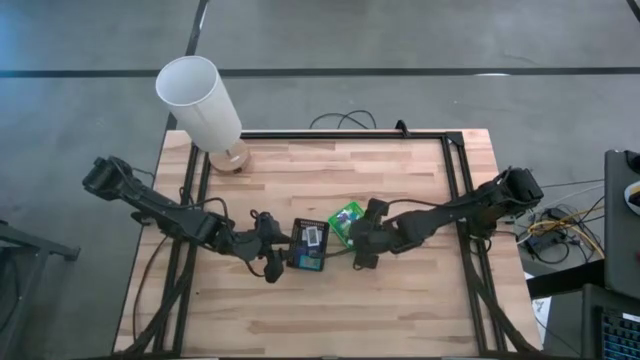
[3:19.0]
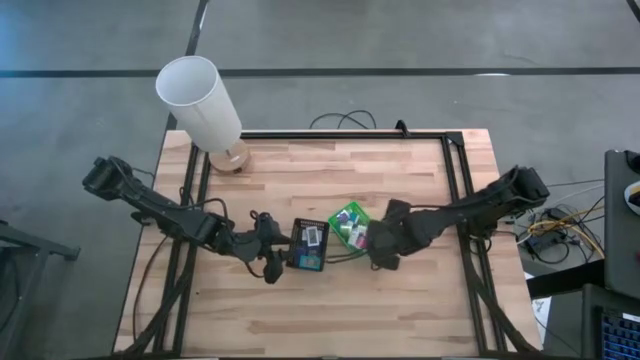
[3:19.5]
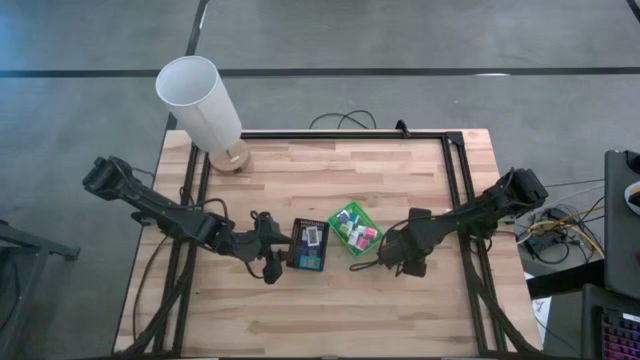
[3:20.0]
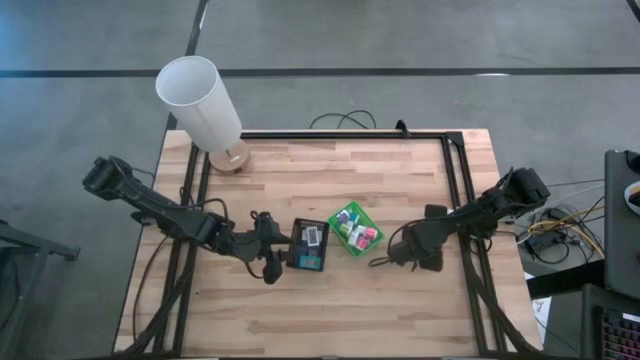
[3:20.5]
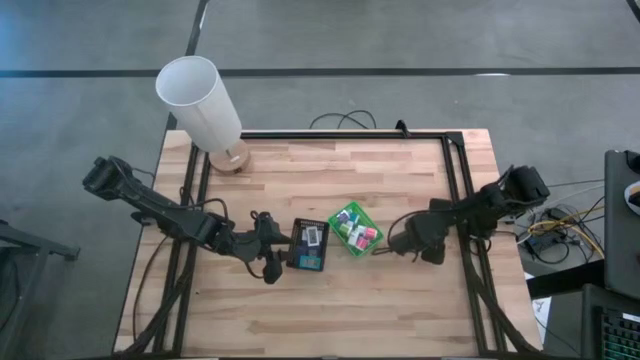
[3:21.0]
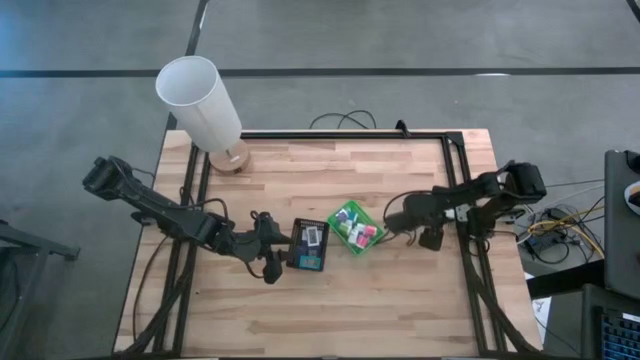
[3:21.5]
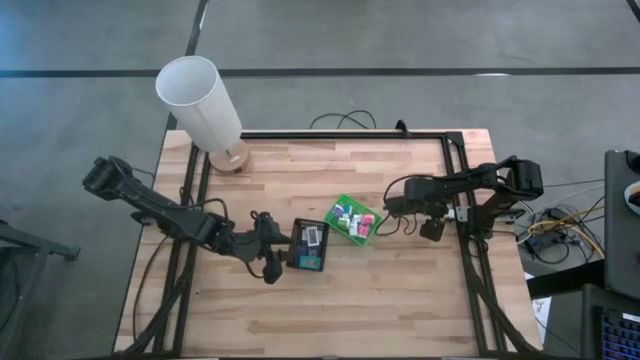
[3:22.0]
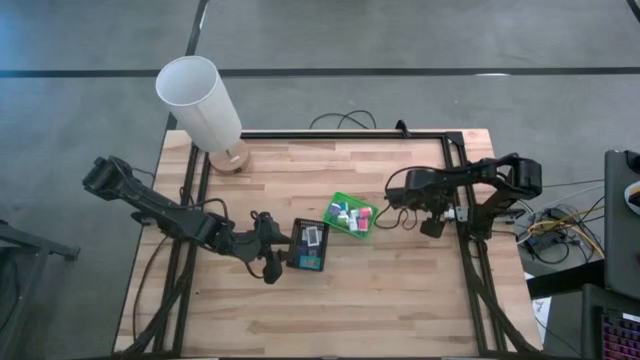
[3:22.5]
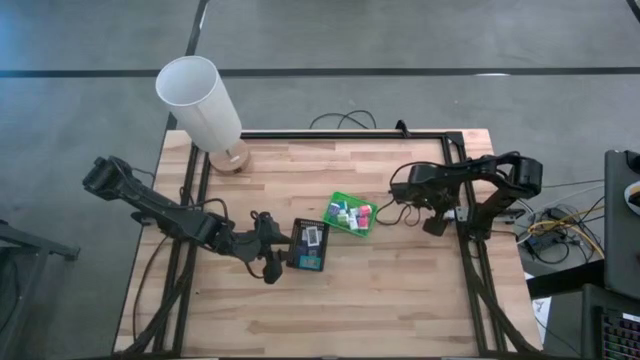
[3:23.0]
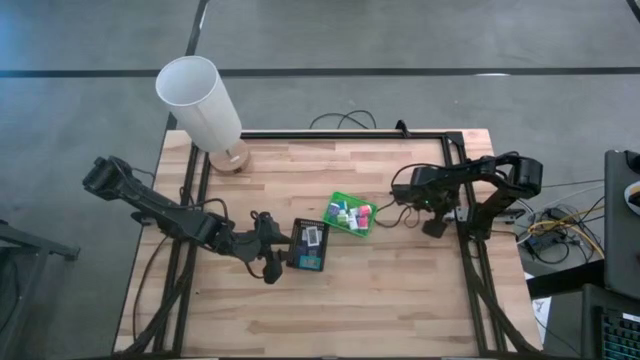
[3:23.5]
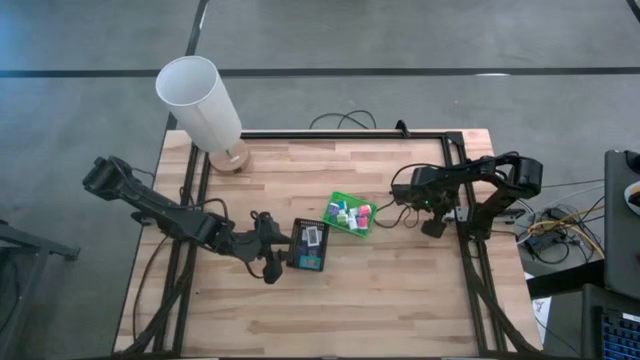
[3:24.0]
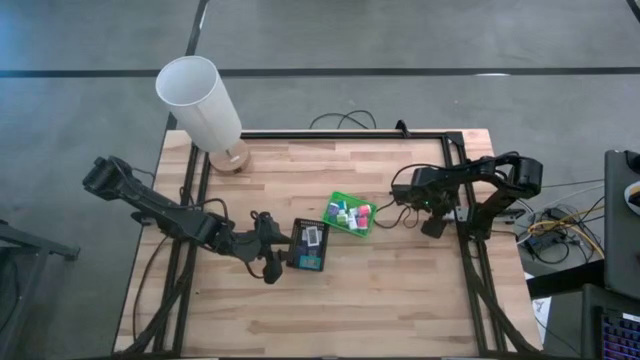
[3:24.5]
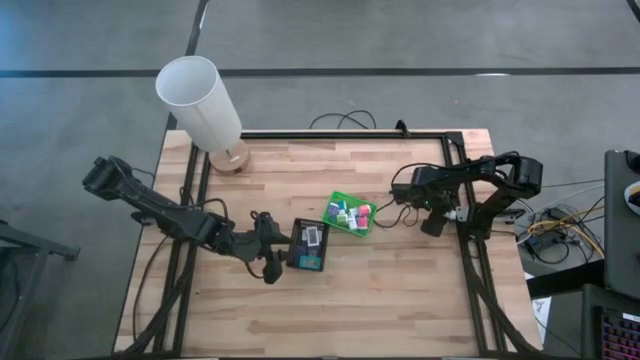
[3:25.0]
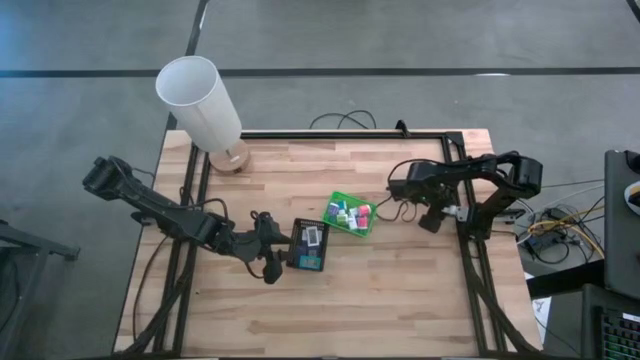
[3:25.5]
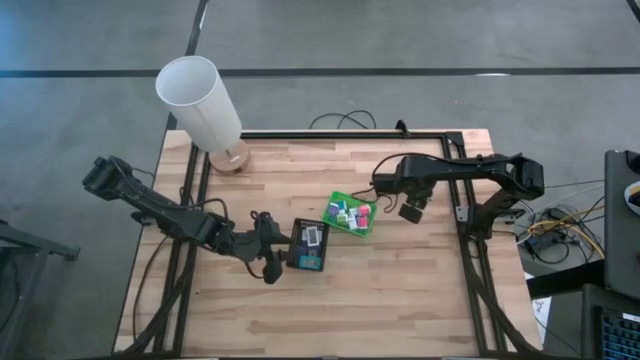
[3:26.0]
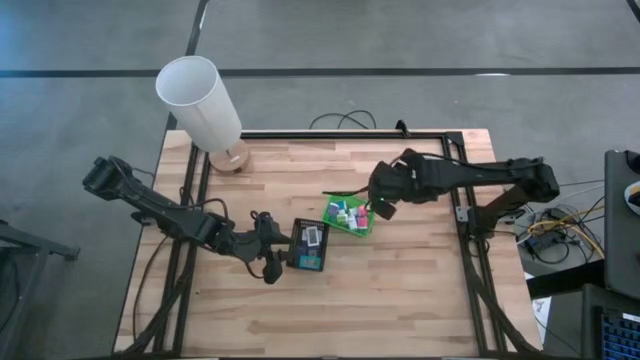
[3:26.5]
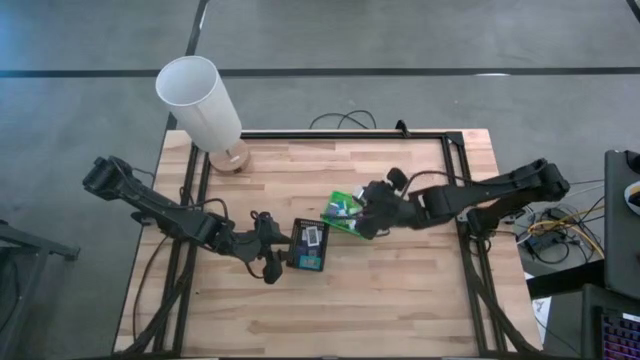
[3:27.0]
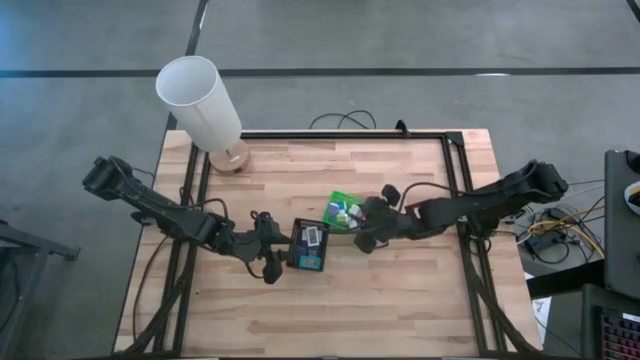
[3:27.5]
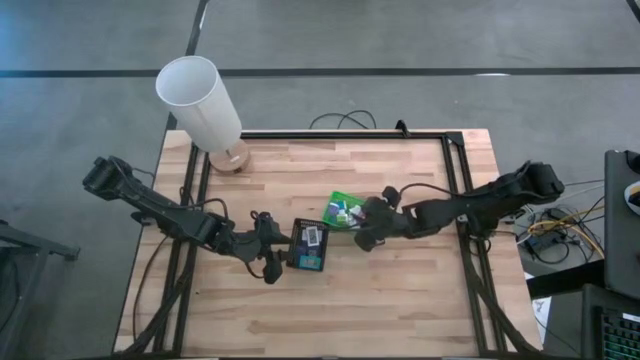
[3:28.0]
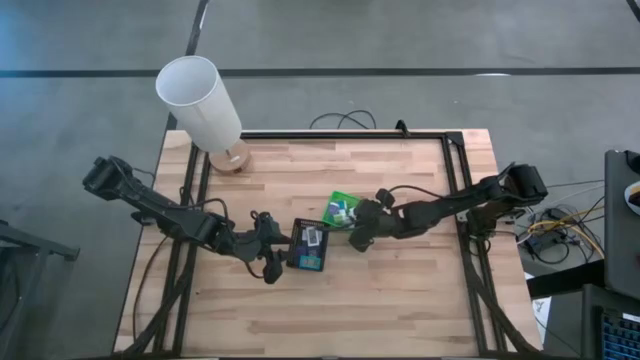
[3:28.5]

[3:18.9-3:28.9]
Task: Pick & Place Office items
Put the white black charger adapter into the green basket

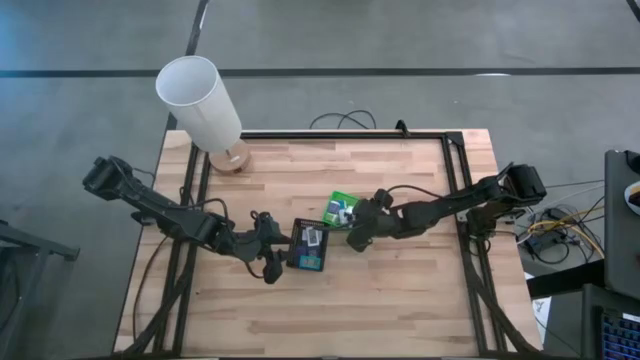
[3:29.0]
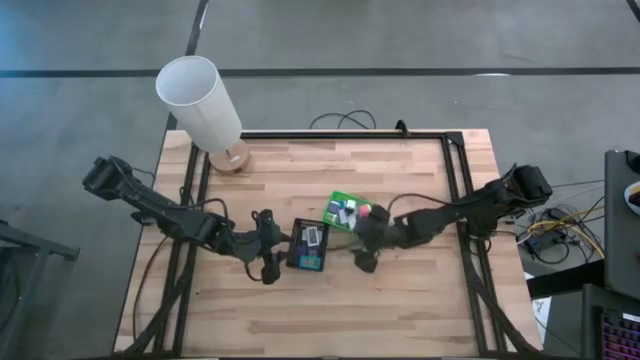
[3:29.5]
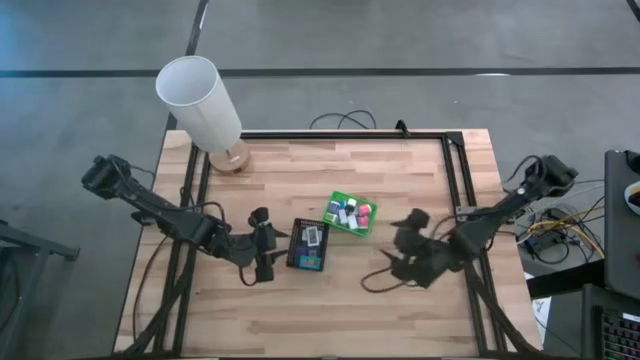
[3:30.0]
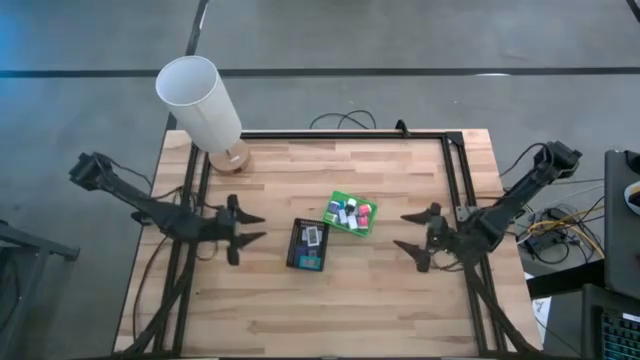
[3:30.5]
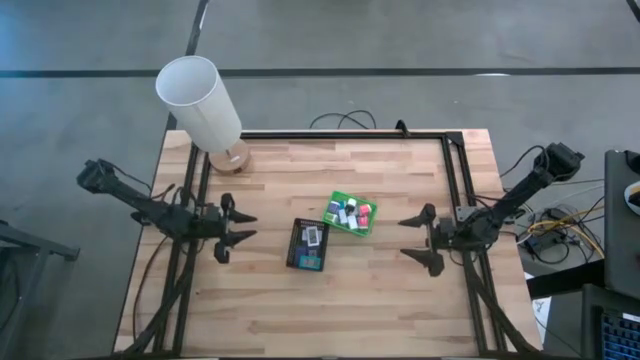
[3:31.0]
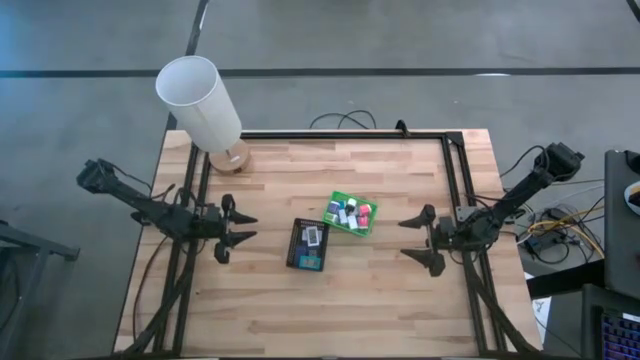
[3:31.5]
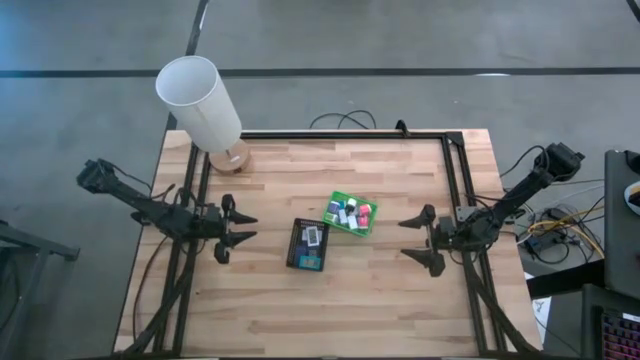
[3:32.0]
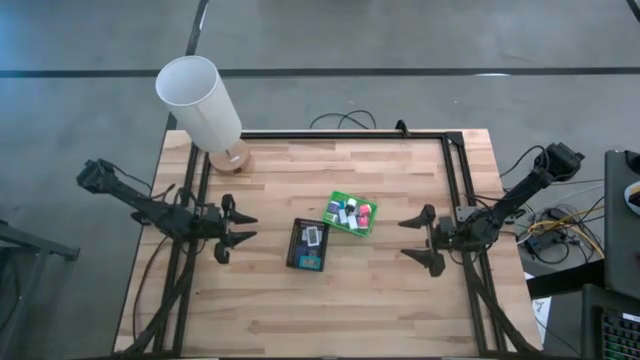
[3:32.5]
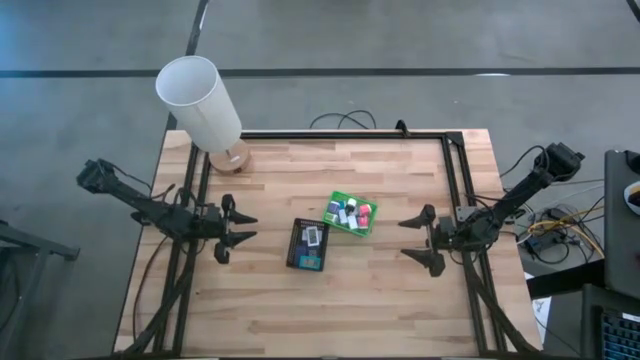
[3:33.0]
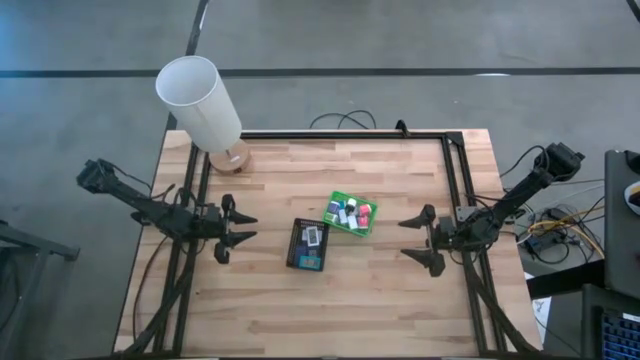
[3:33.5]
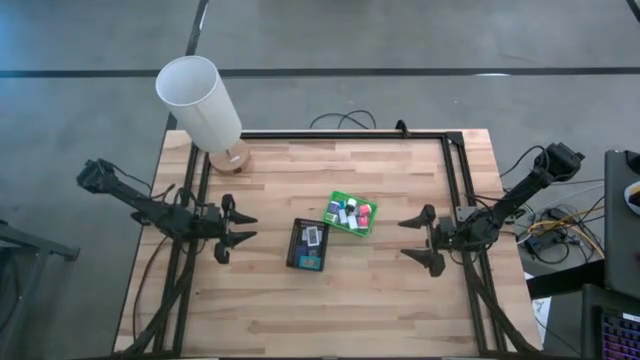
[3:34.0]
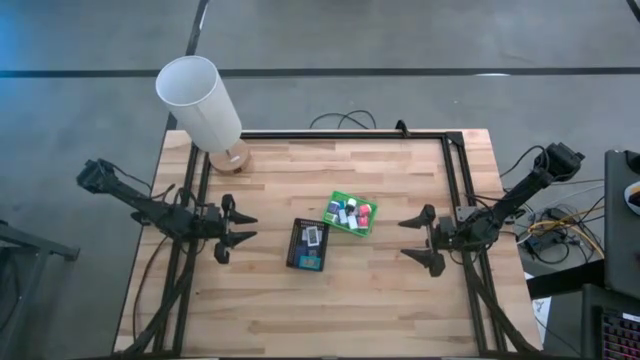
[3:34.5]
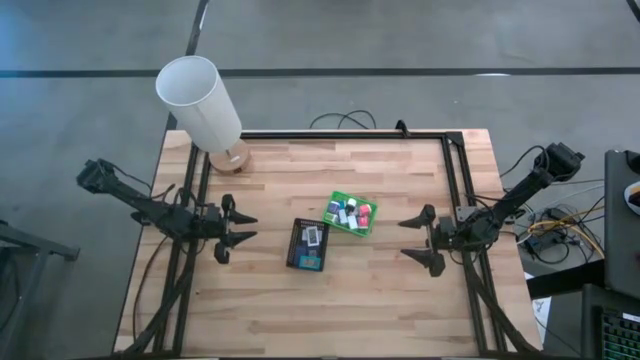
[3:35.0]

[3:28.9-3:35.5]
Return to Home Position

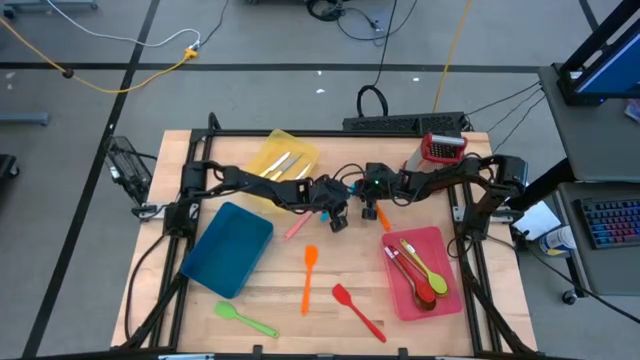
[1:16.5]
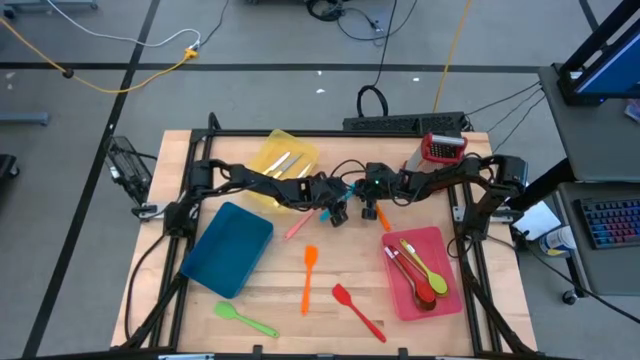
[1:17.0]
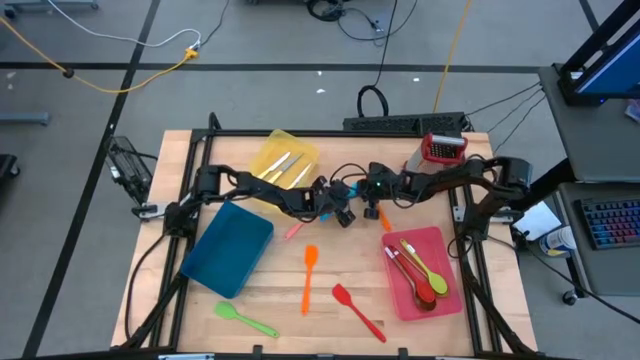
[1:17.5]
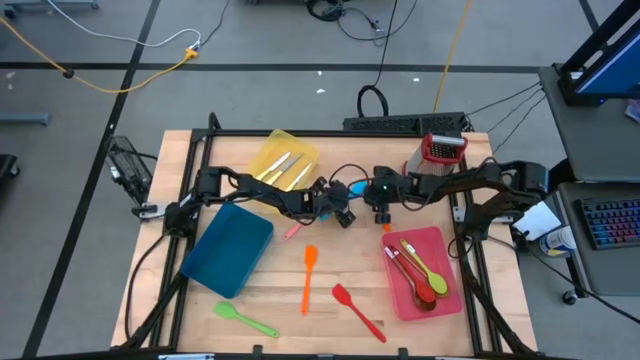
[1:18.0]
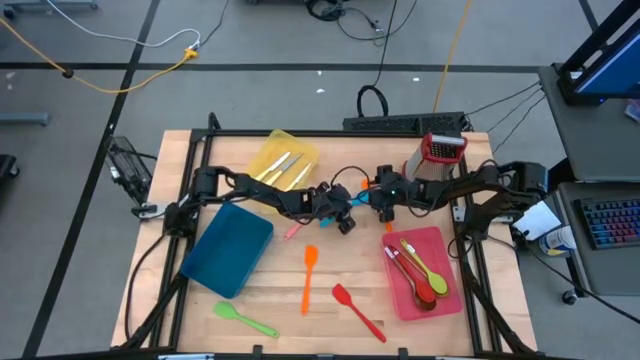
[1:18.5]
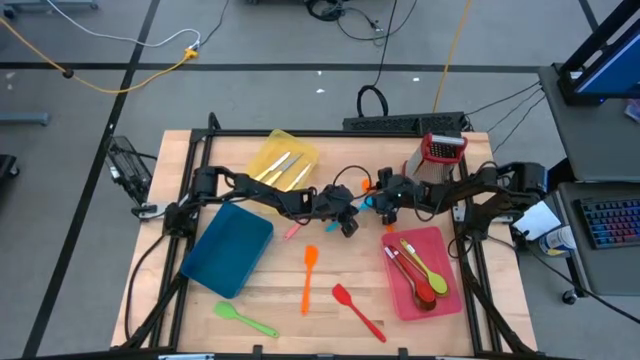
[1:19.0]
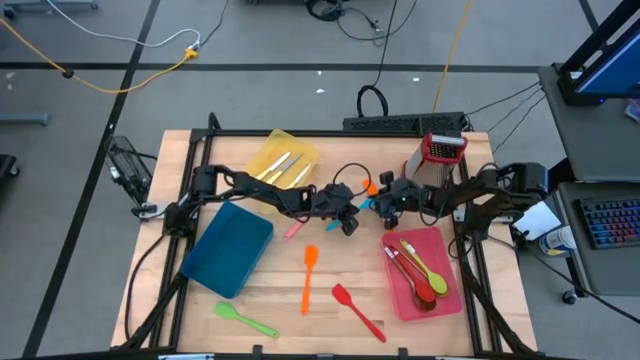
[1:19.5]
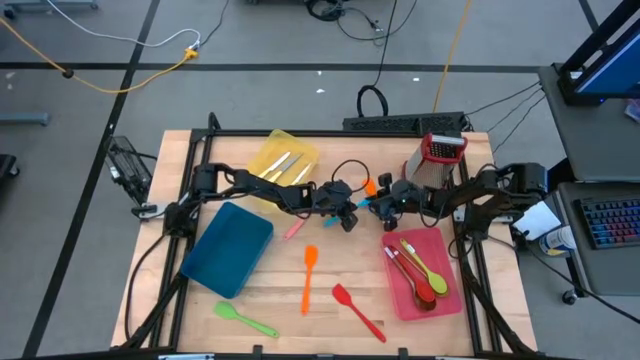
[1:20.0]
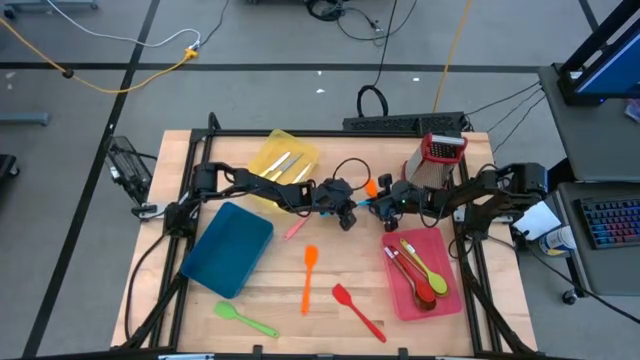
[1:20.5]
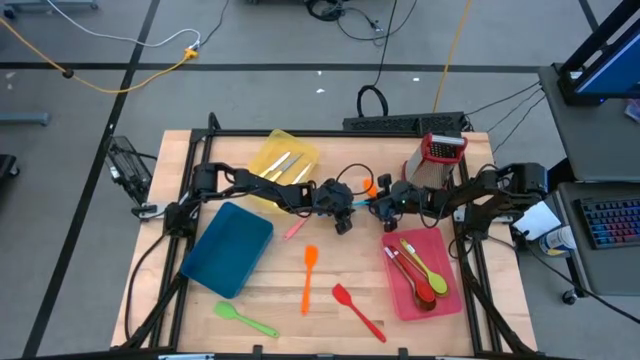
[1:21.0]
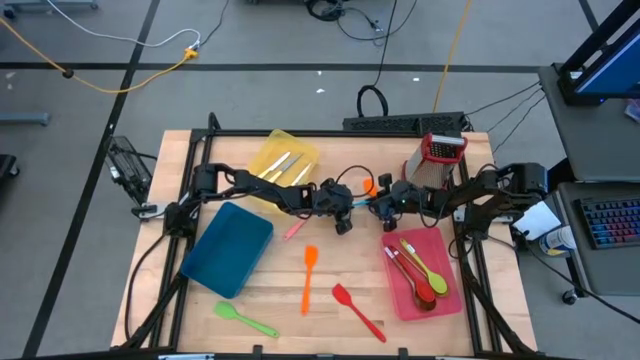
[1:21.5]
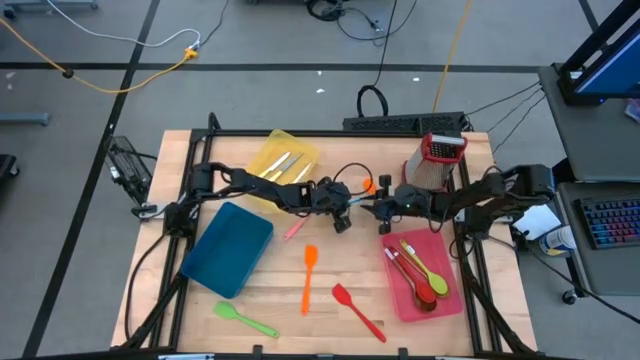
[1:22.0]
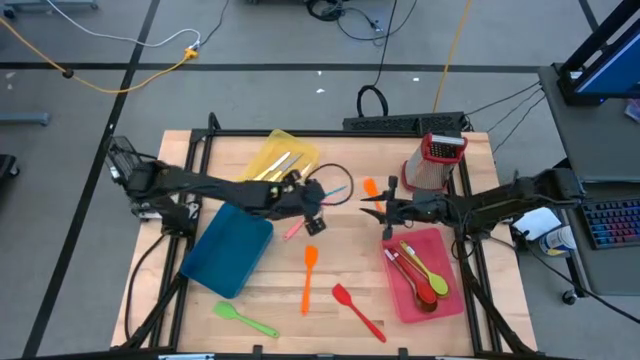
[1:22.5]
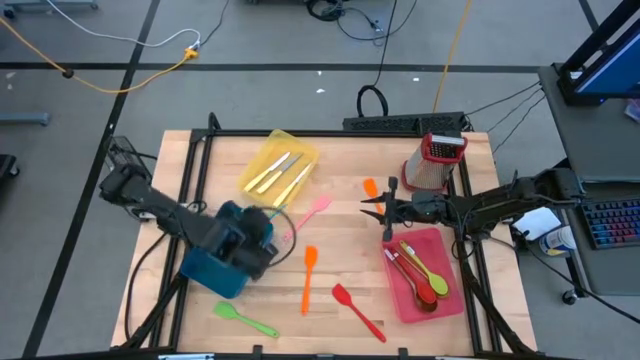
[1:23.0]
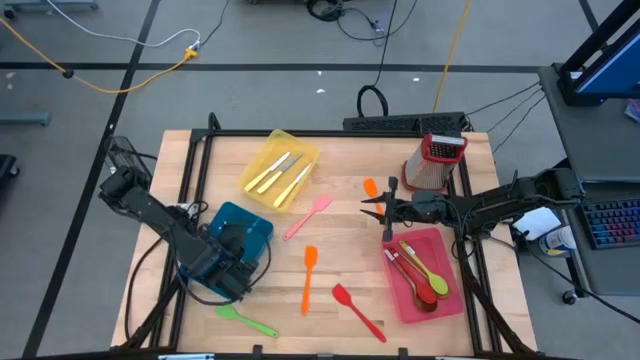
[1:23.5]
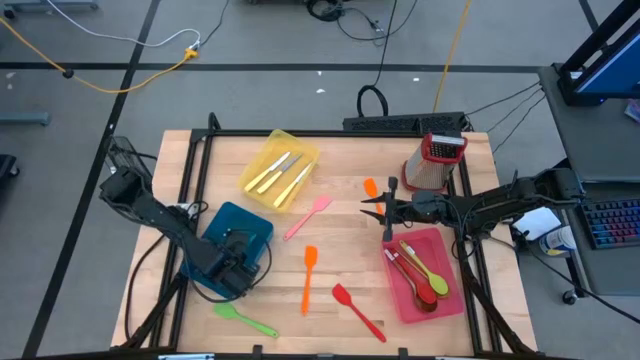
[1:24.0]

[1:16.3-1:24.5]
Task: Pick & Place Kitchen Items
Put the blue spatula into the blue bin
